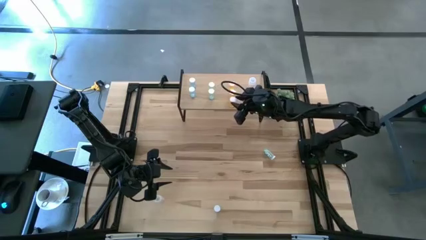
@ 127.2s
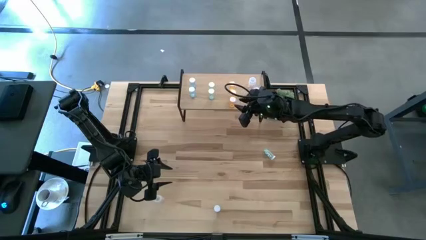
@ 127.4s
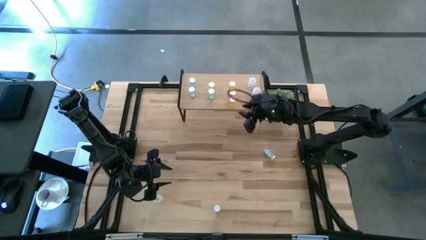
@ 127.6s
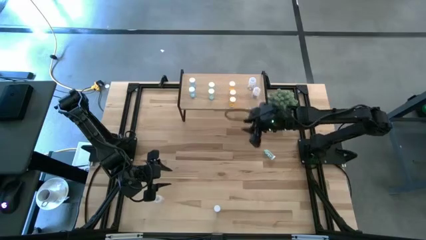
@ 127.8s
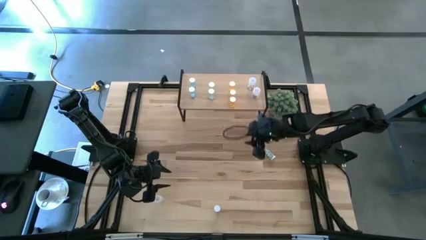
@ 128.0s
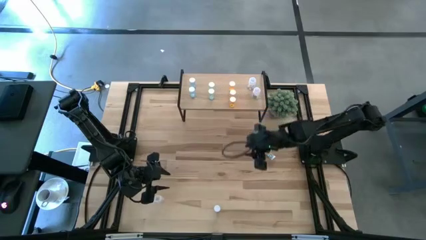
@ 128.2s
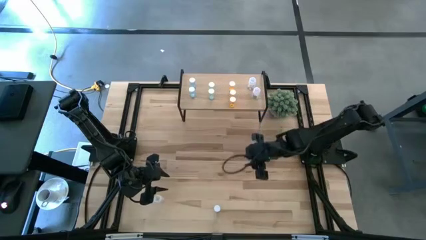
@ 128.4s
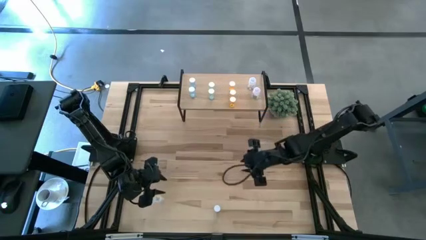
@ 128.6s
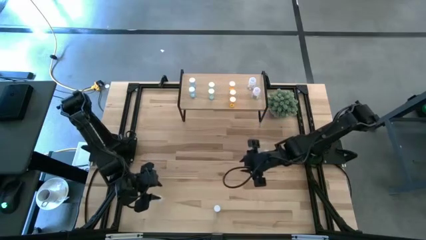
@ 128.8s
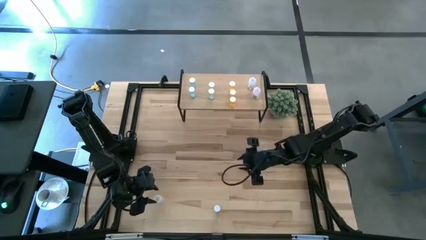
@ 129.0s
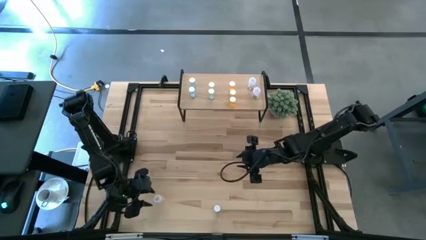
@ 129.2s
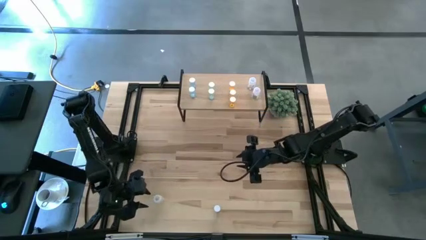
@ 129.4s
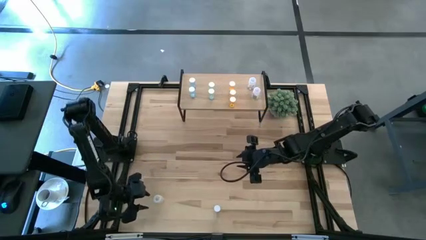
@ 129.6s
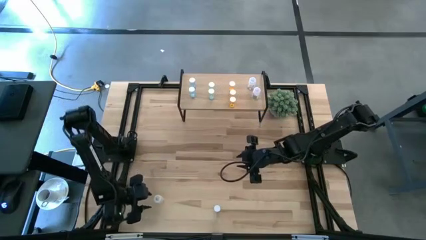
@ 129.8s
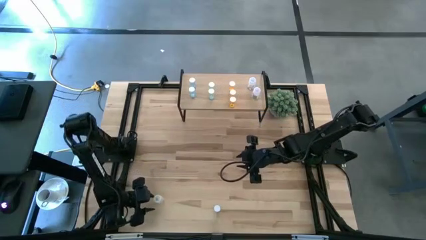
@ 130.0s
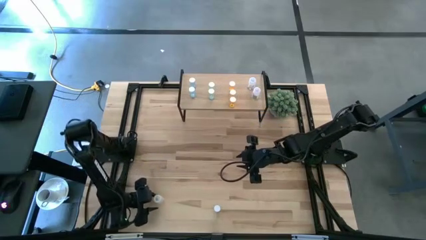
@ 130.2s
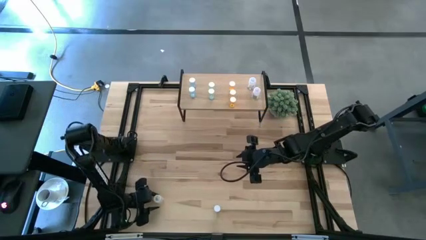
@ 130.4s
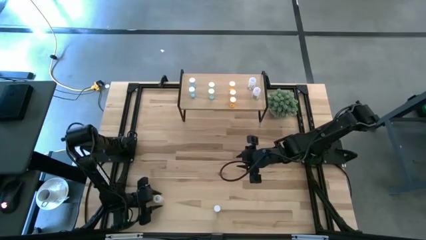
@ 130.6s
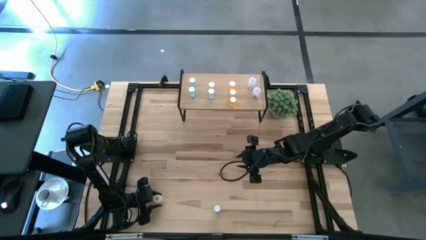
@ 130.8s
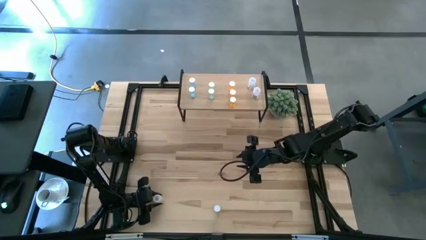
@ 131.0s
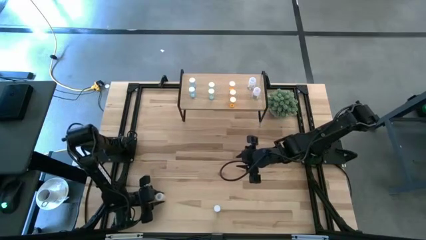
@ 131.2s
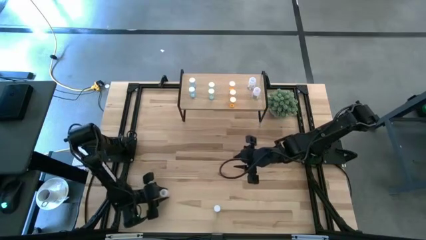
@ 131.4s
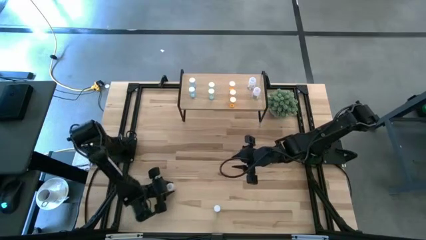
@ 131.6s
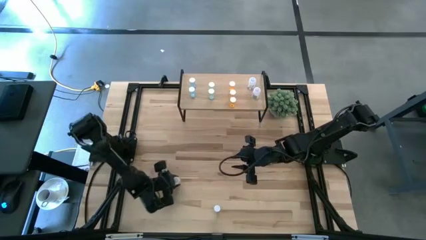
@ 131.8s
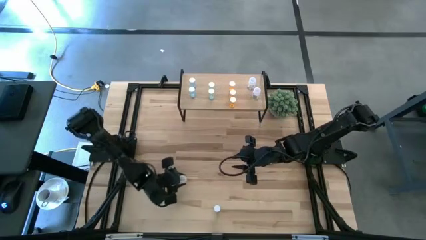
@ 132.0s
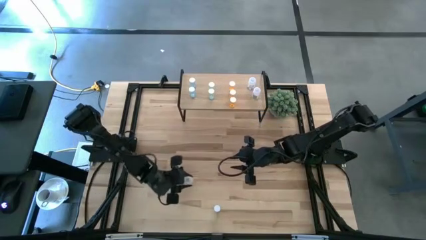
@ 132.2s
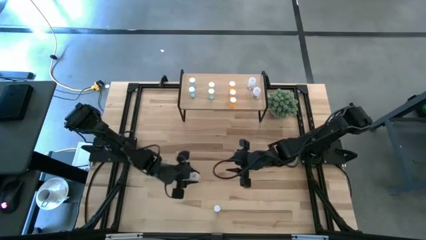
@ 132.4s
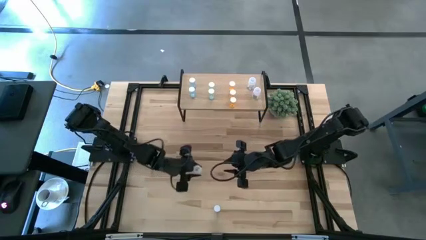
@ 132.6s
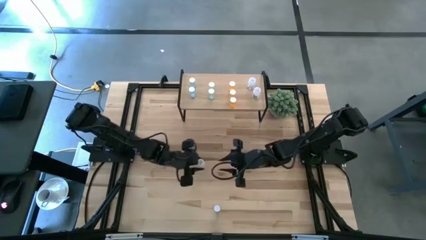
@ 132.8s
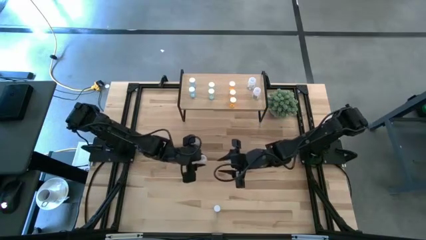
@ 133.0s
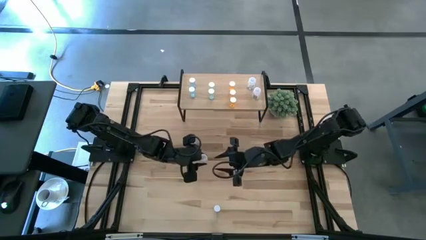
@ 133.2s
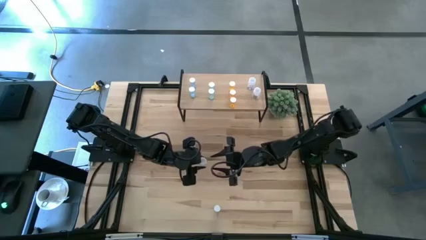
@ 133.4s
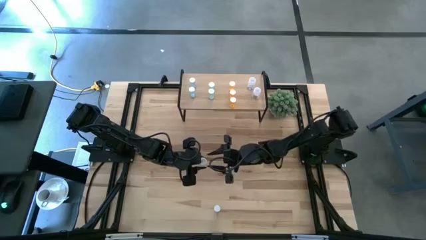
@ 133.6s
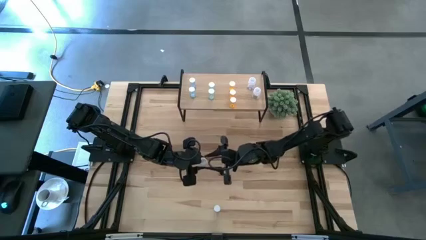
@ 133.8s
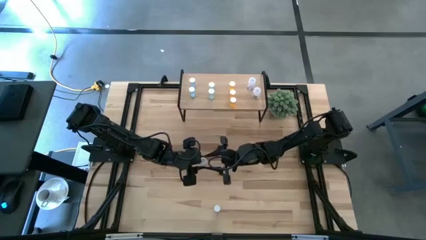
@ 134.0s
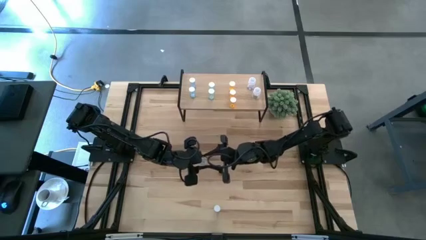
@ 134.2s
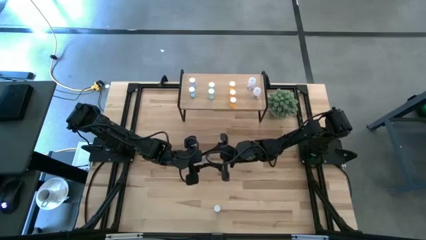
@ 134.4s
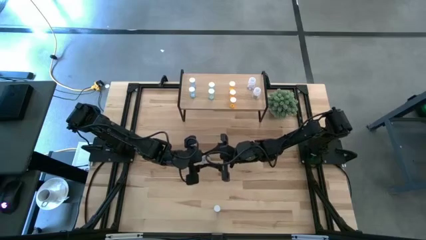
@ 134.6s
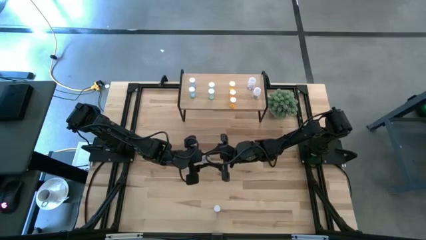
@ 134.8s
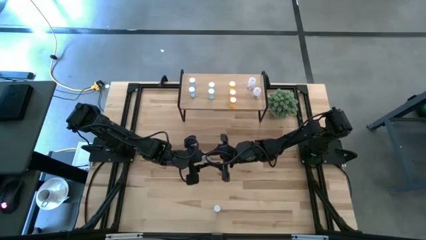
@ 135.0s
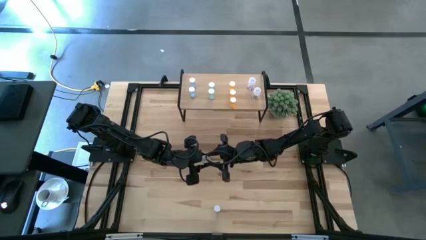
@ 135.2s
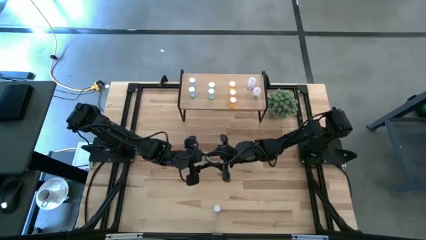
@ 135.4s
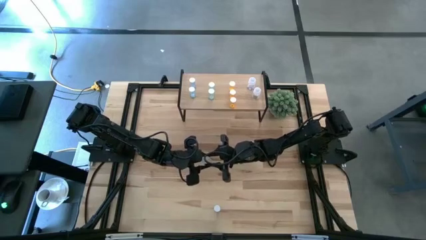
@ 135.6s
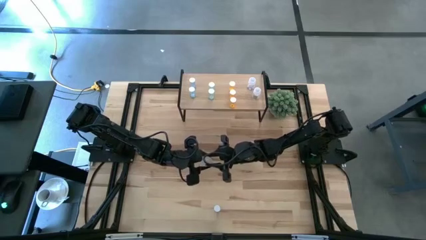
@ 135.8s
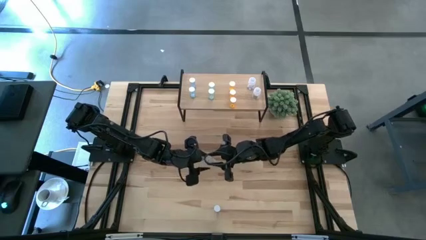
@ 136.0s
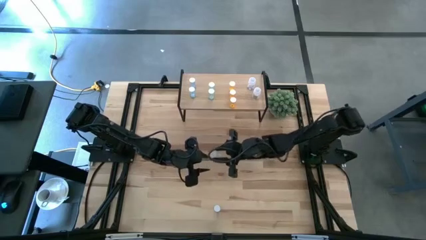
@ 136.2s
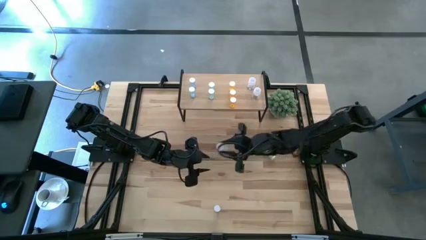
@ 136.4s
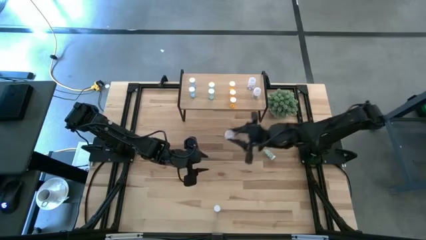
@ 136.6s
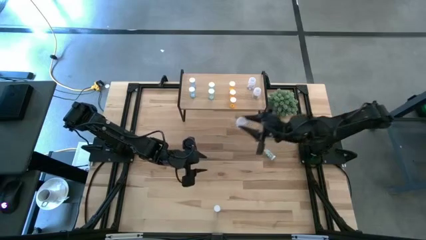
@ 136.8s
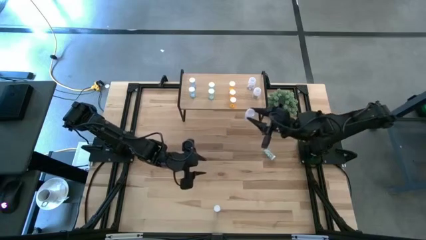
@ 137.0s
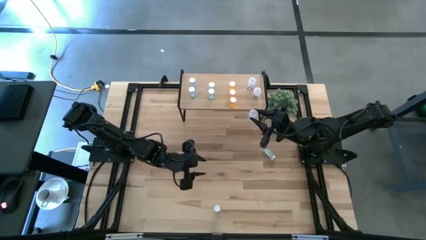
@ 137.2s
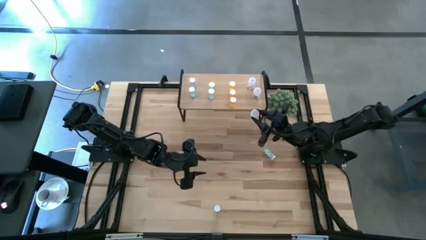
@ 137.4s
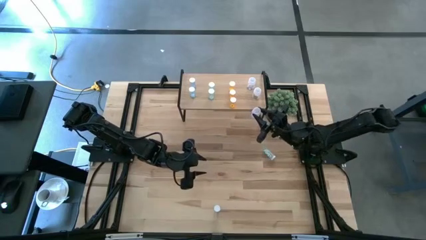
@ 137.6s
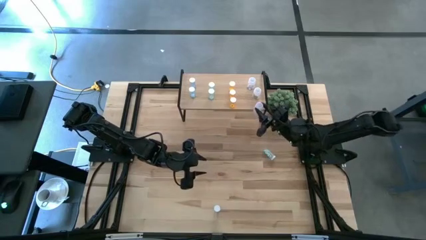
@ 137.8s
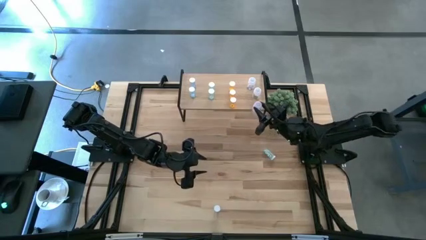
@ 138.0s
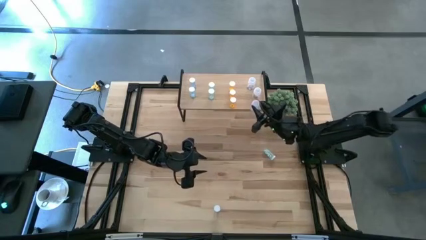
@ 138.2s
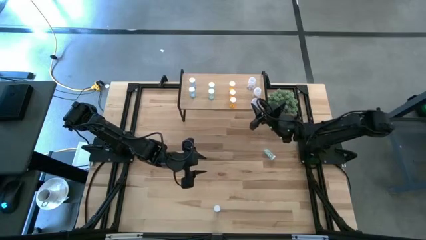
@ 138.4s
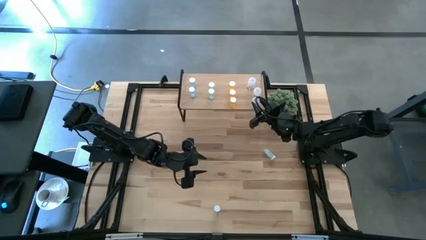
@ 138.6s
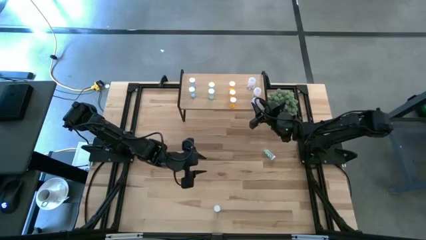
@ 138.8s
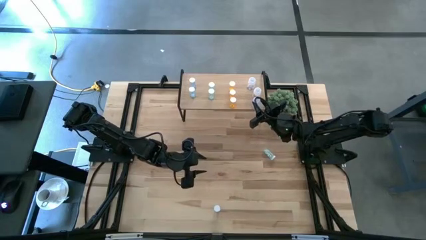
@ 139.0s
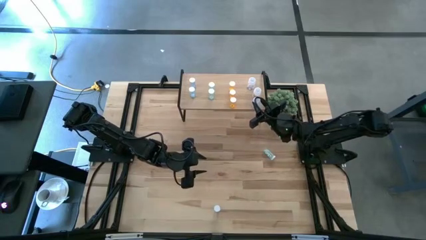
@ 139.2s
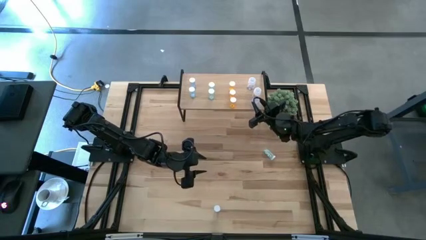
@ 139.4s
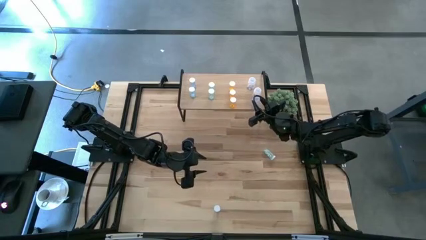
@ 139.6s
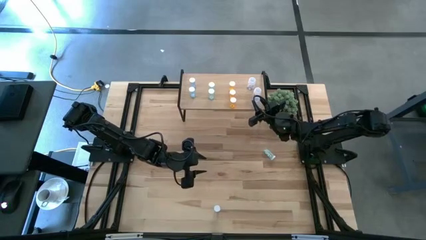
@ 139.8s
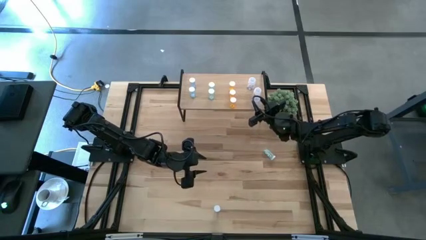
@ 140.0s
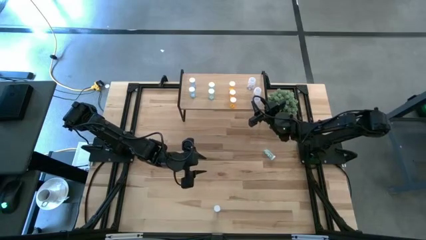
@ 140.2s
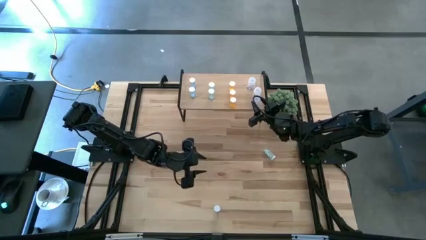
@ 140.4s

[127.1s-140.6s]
Task: Pick and place medicine bottles onto shelf by color
Put the transparent pill bottle on the shelf aligned with the other transparent pill bottles

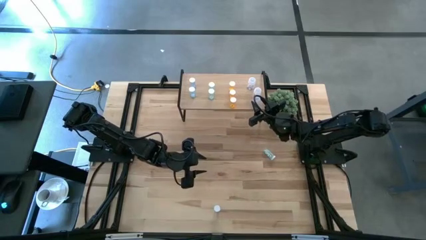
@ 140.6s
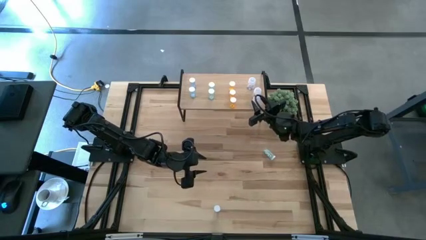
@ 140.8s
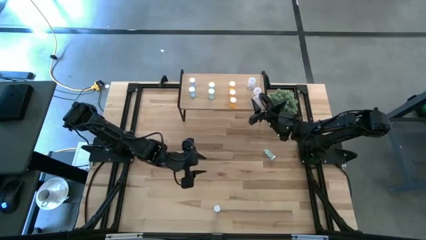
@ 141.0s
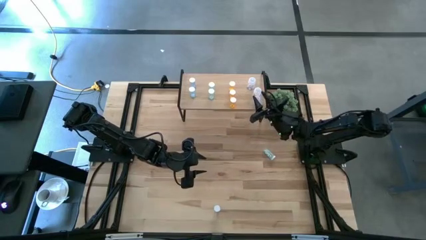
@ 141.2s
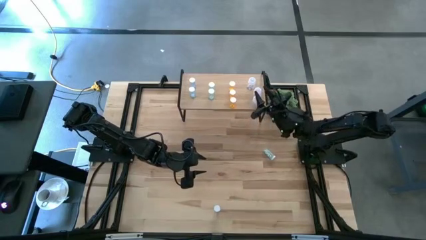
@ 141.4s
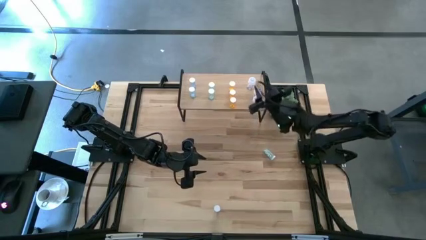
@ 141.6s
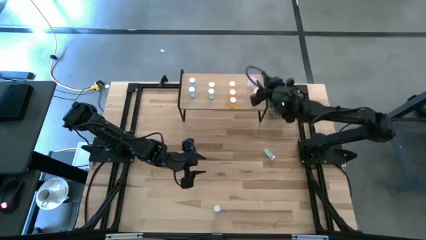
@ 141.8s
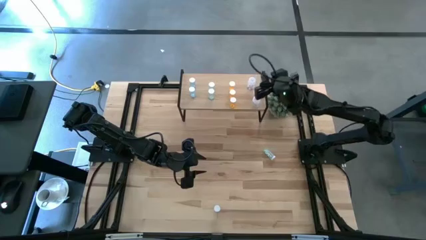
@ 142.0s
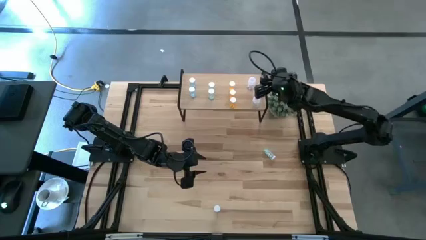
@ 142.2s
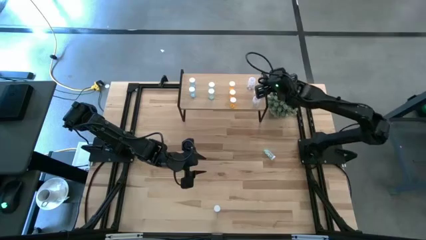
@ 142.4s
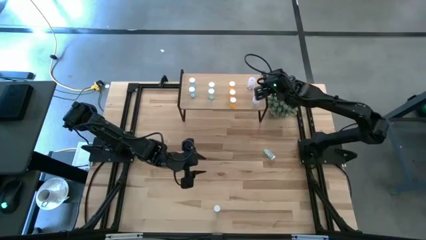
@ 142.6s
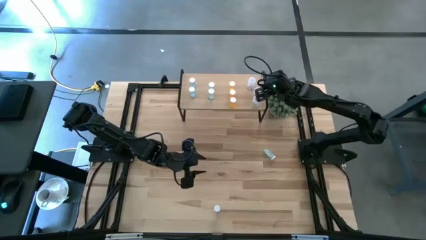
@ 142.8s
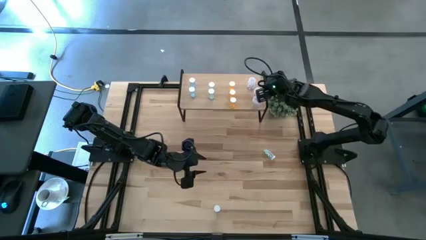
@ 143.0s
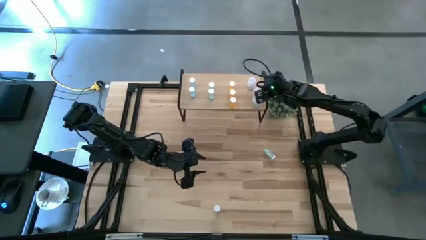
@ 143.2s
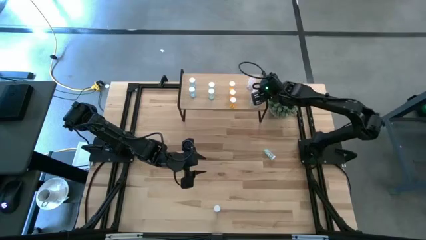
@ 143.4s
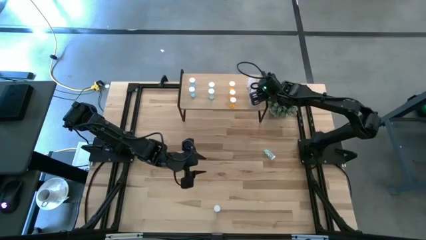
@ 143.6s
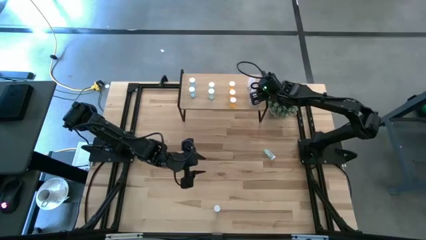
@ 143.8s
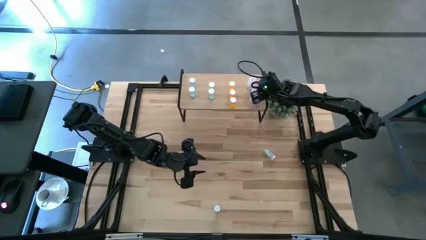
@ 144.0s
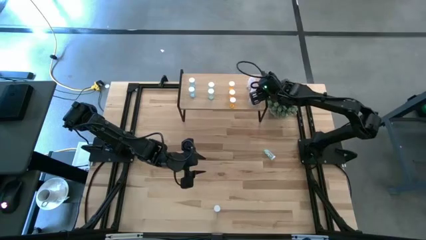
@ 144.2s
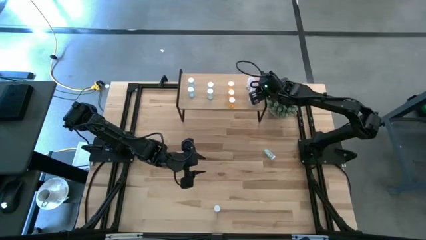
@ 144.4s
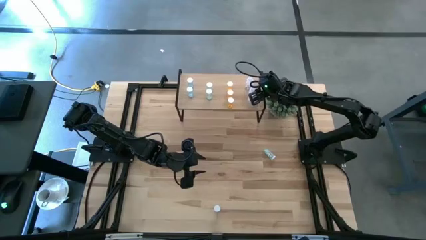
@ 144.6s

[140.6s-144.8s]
Adjust the transparent pill bottle on the shelf
